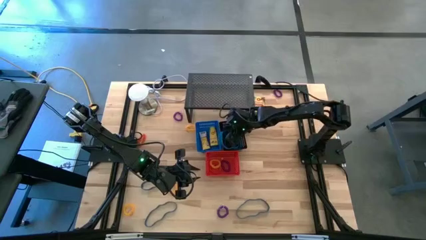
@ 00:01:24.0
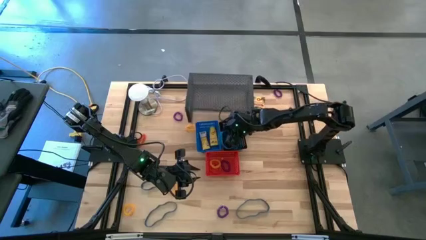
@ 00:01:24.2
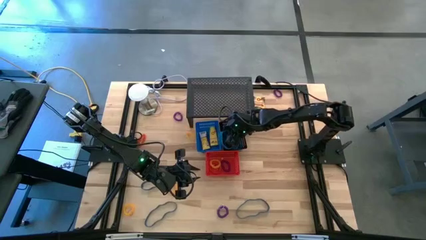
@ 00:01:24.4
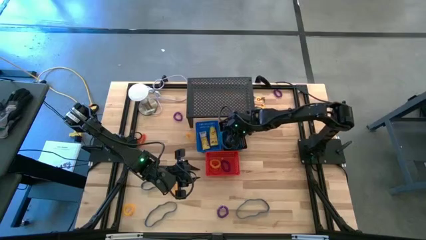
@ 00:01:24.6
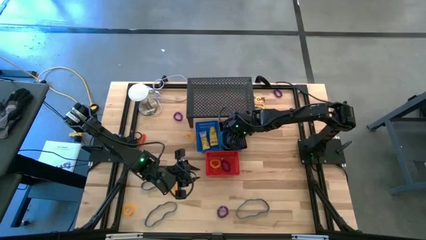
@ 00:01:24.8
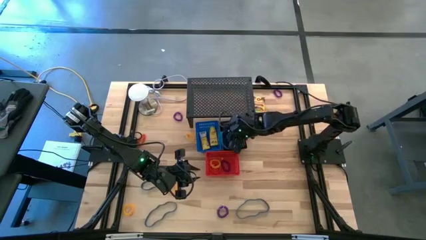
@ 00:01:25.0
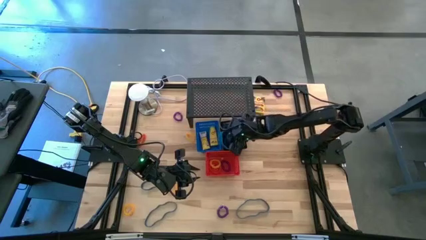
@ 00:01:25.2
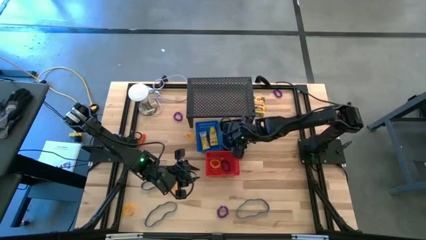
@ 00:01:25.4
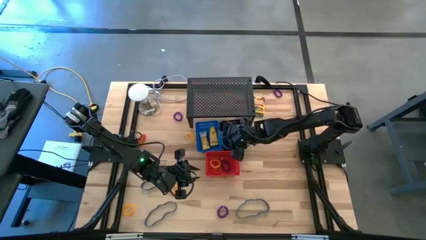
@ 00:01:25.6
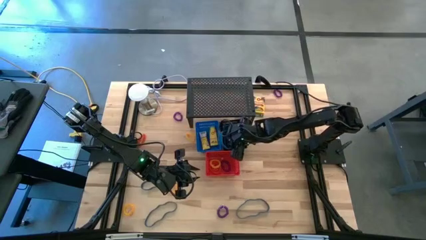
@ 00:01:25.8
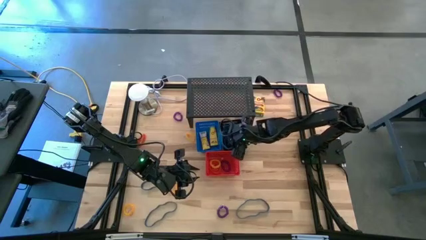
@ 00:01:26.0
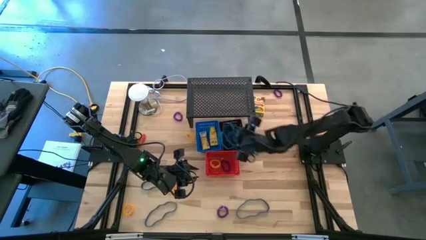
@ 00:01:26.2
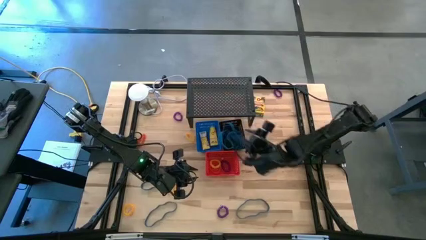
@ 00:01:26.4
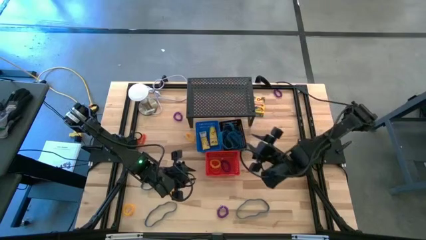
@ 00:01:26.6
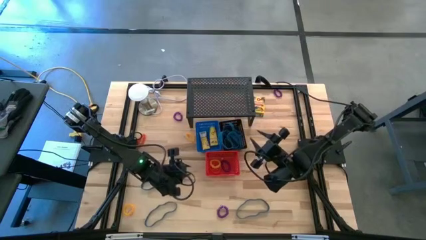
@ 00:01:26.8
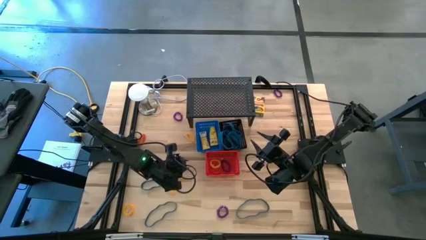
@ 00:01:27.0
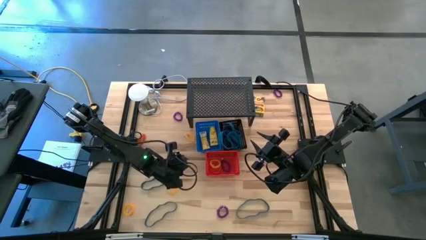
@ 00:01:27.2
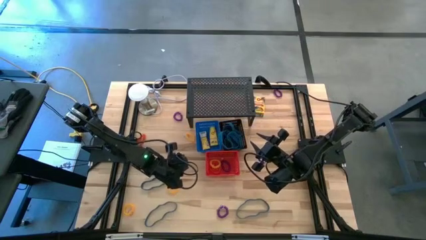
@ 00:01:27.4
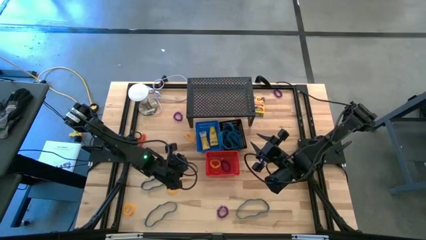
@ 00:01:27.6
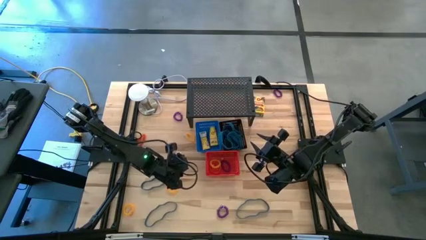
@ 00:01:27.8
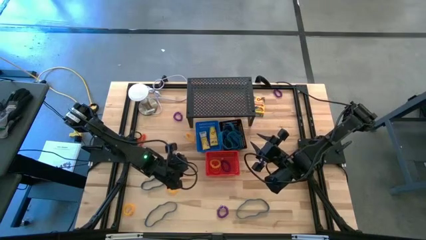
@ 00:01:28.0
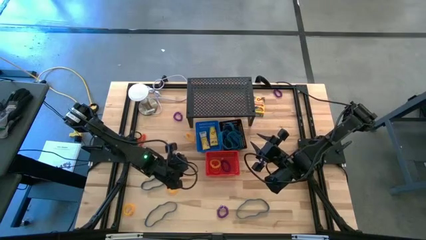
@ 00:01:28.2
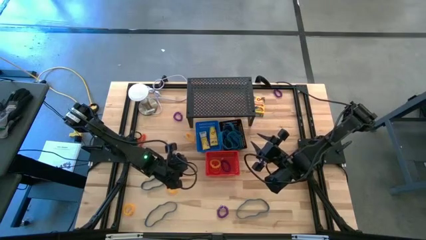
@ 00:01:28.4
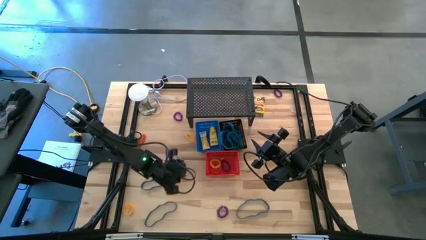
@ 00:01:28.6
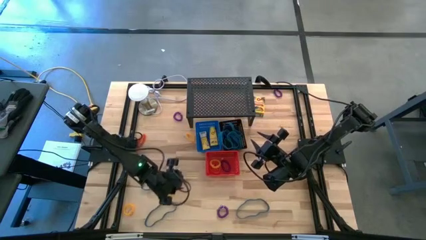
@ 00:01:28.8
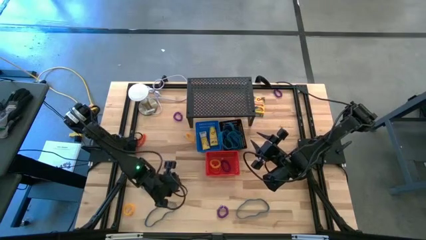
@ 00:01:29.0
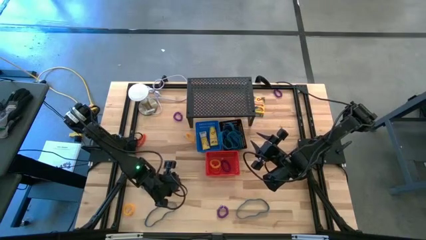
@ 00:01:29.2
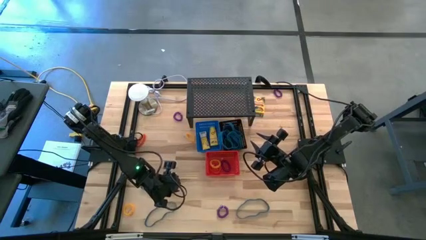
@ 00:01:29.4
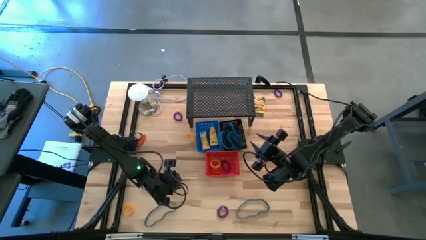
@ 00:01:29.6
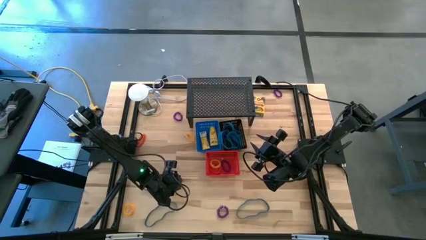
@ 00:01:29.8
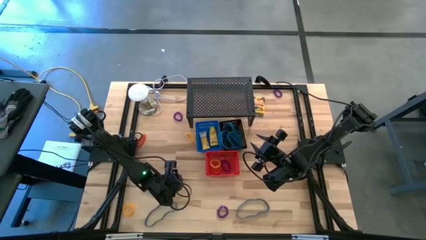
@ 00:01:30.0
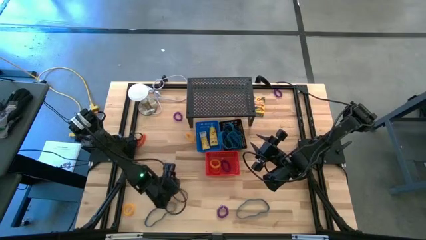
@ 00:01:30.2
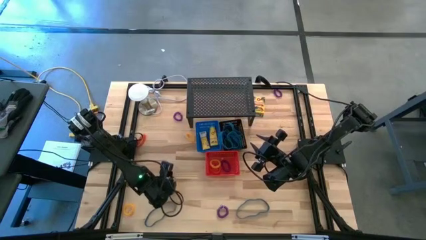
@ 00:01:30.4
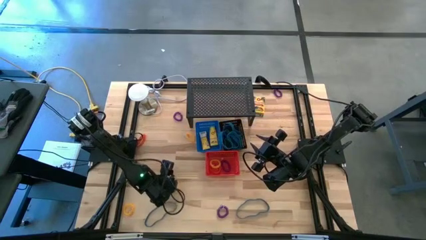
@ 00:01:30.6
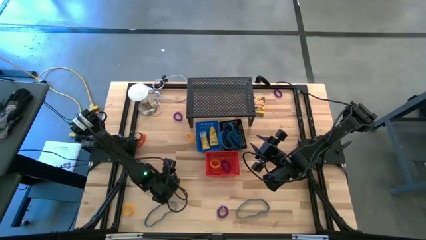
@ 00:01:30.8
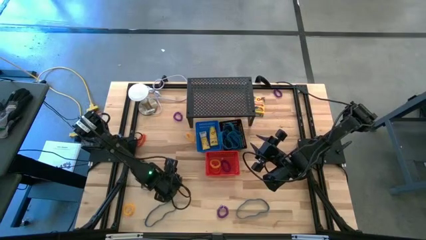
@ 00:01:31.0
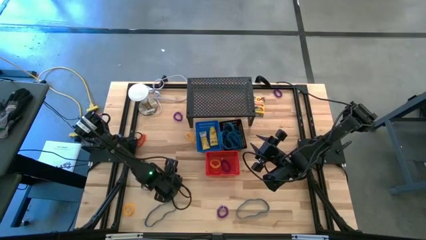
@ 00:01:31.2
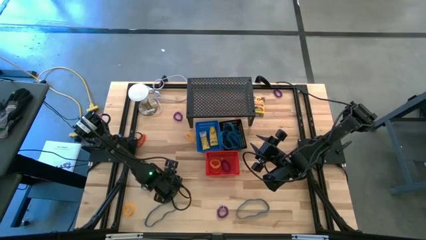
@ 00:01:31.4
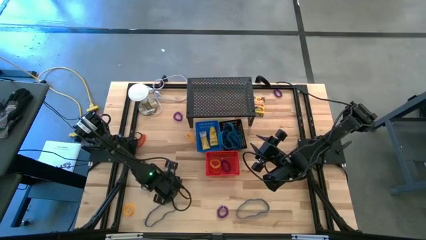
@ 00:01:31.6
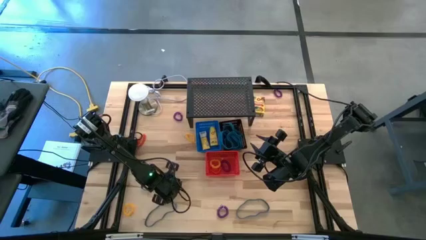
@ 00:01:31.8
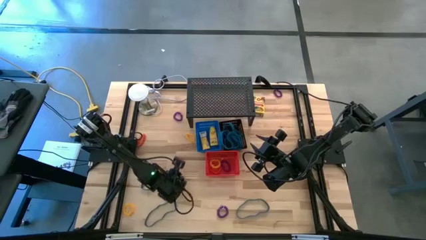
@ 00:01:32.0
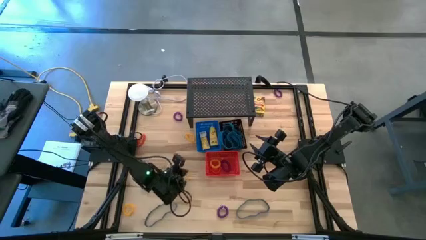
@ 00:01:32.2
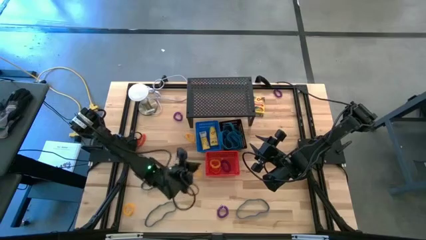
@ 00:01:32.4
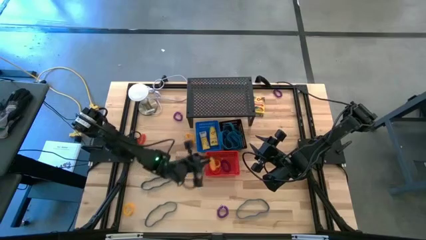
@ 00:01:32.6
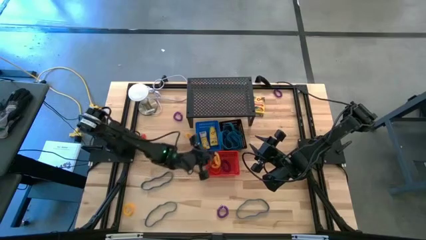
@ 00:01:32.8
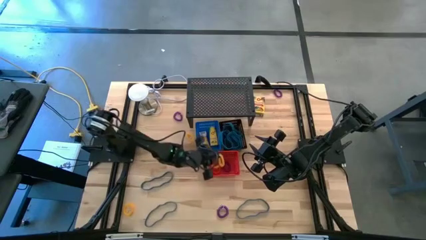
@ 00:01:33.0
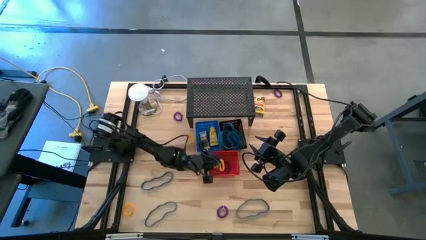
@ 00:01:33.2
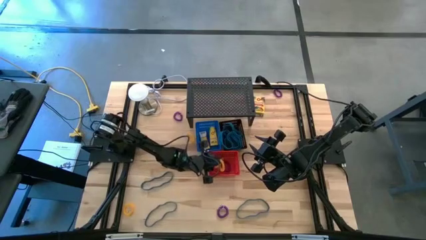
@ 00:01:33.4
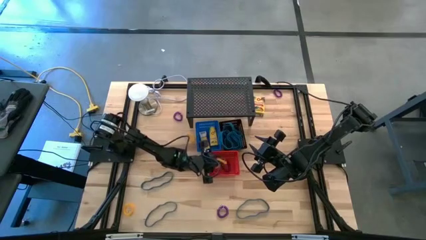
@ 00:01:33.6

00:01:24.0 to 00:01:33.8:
Task: Pick & Place Office Desk Supplies
Put the yellow spring keychain into the red bin

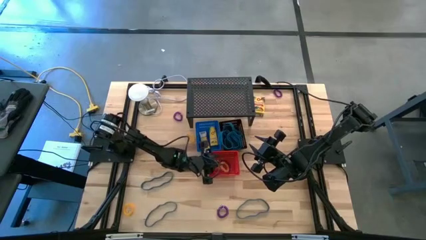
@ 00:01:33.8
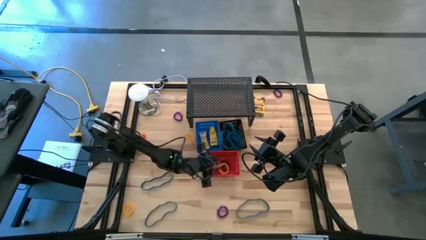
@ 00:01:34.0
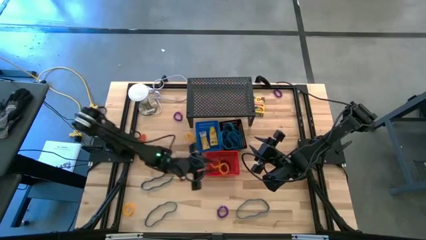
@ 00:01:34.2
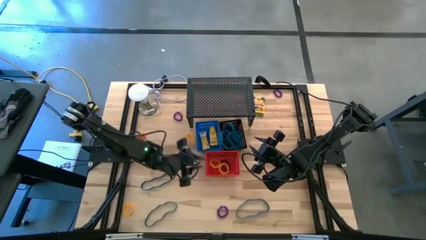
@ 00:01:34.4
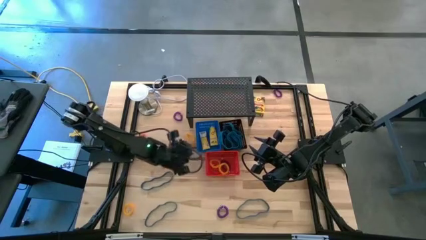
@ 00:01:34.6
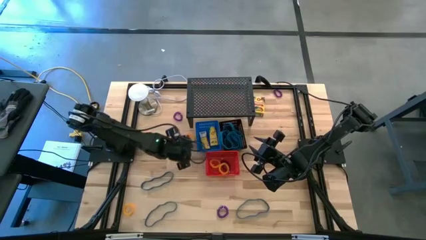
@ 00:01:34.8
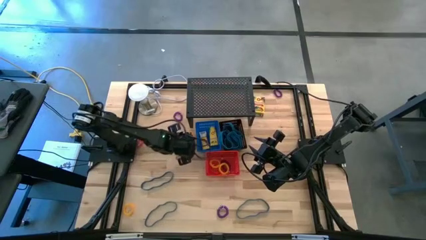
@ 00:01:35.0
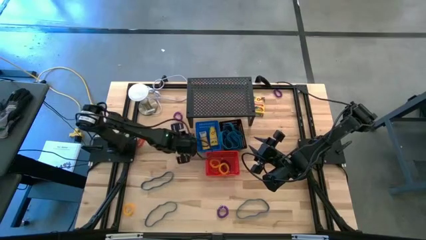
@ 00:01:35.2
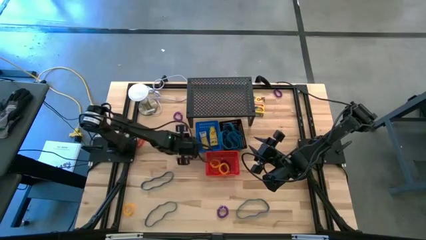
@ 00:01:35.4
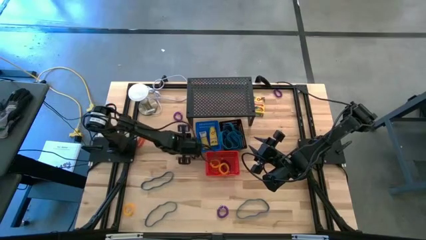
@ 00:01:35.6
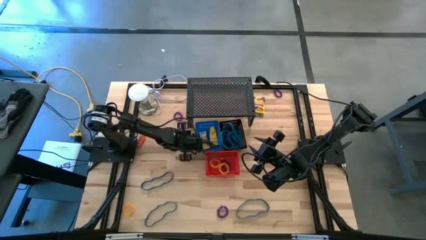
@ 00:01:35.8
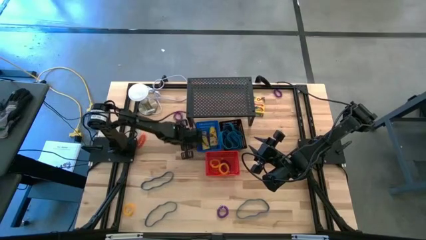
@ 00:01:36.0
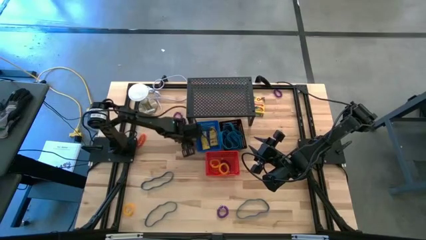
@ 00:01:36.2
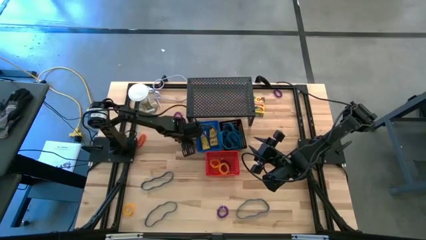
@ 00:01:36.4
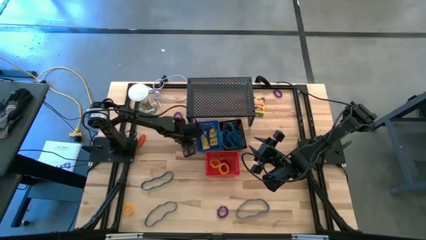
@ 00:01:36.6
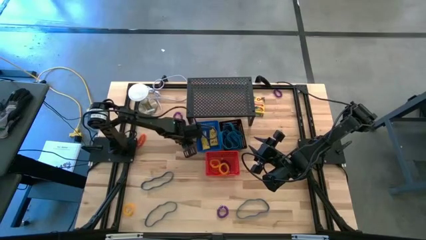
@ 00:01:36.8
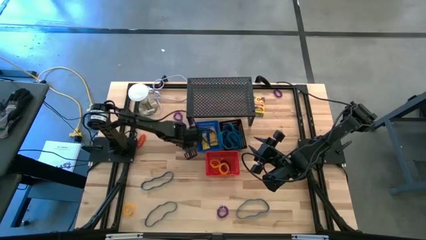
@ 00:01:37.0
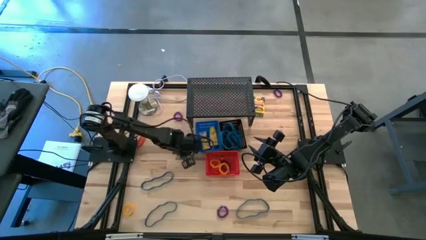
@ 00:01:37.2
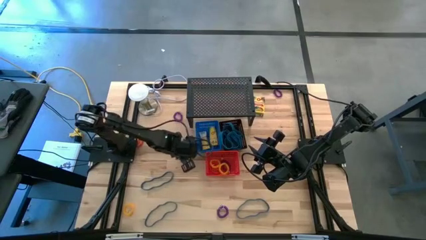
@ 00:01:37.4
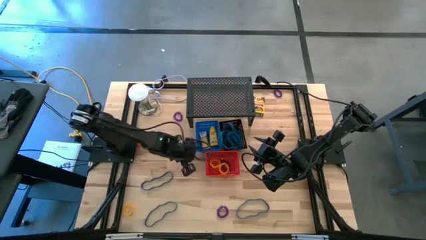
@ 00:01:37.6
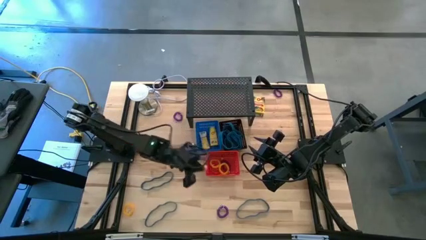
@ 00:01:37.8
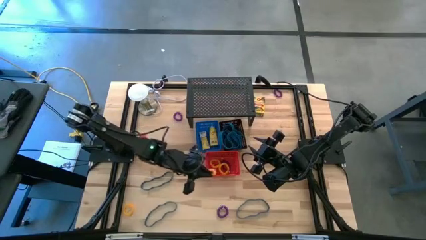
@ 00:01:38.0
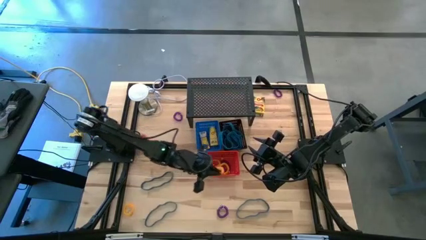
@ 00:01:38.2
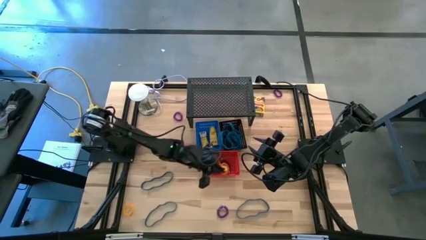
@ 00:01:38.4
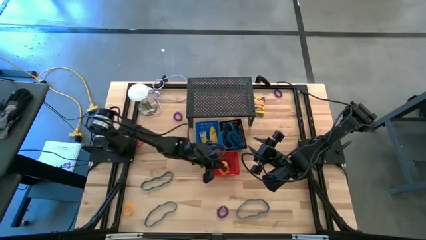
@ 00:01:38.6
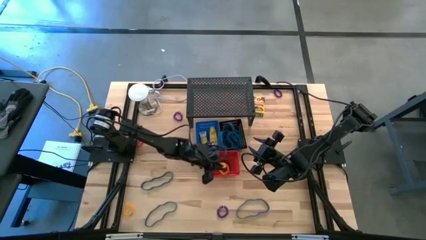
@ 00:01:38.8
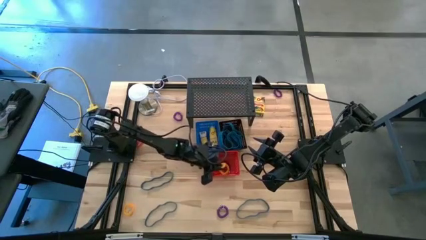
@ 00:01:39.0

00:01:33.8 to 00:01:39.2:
Put the yellow spring keychain into the red bin
